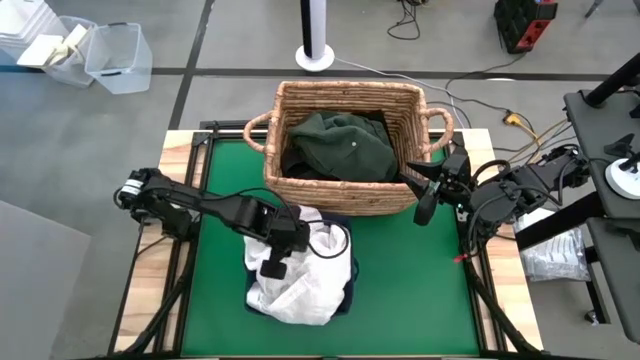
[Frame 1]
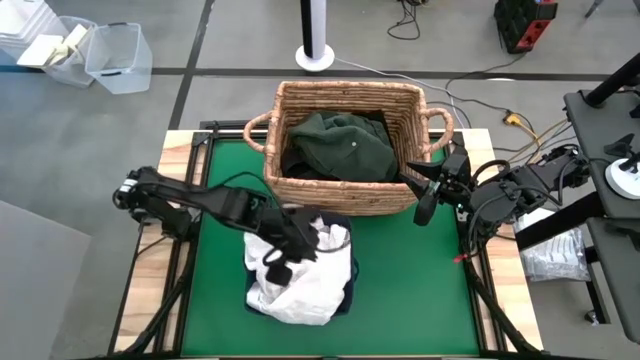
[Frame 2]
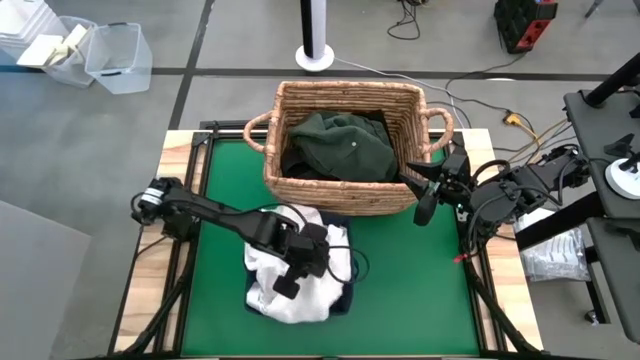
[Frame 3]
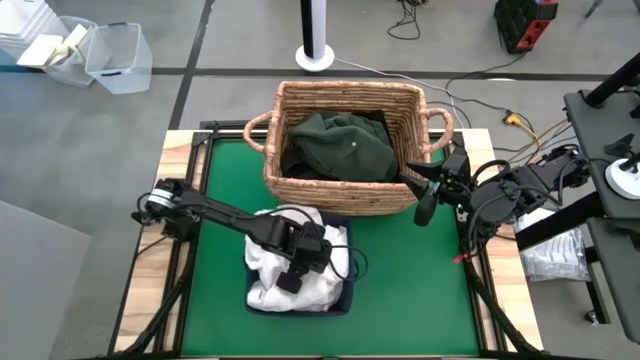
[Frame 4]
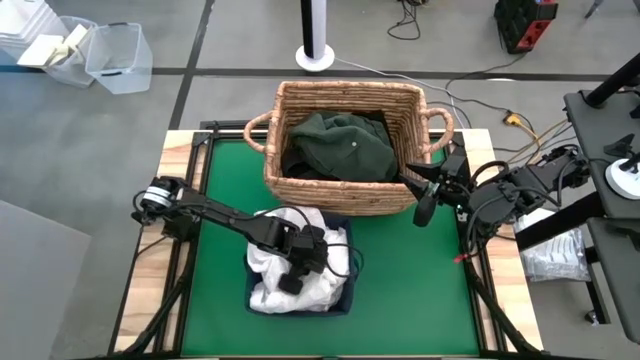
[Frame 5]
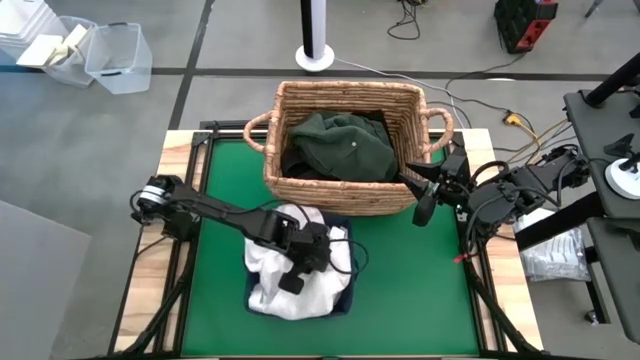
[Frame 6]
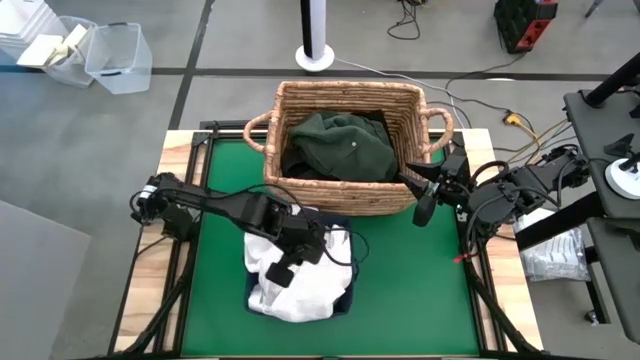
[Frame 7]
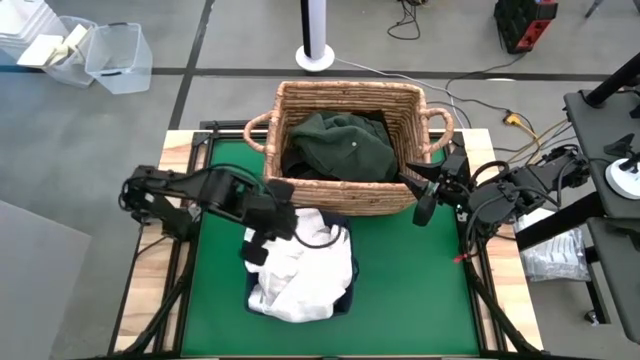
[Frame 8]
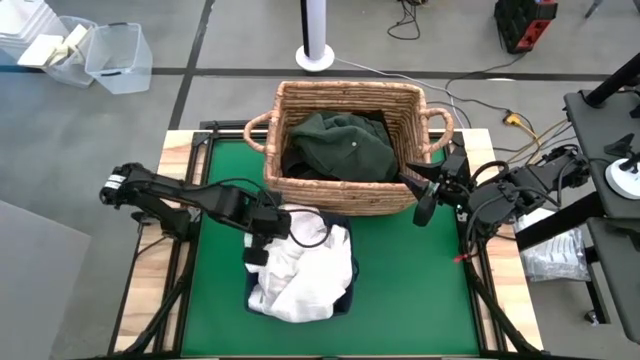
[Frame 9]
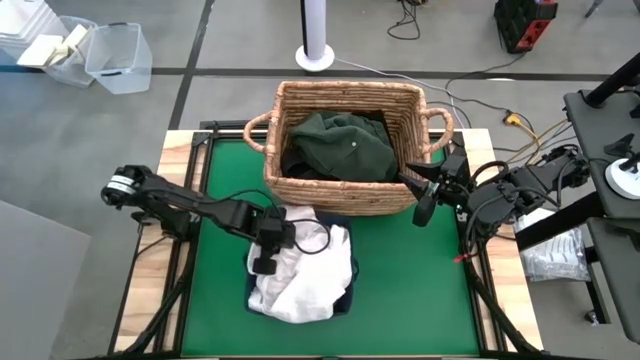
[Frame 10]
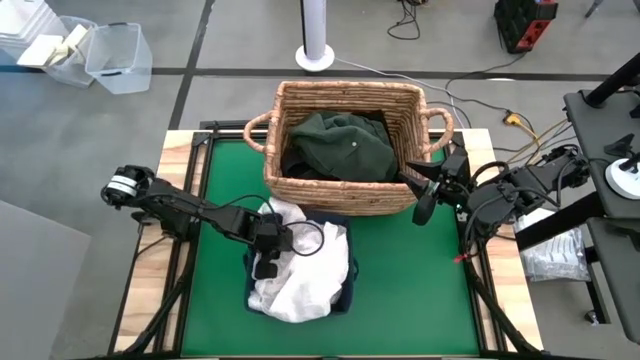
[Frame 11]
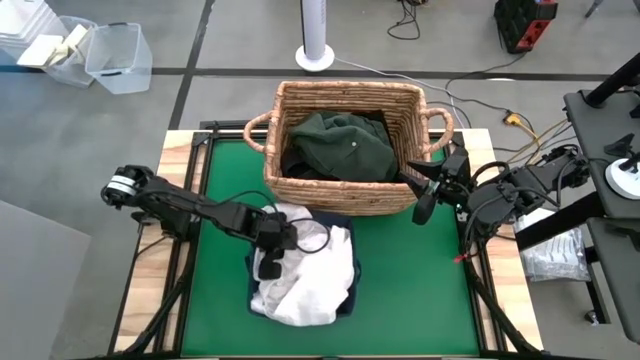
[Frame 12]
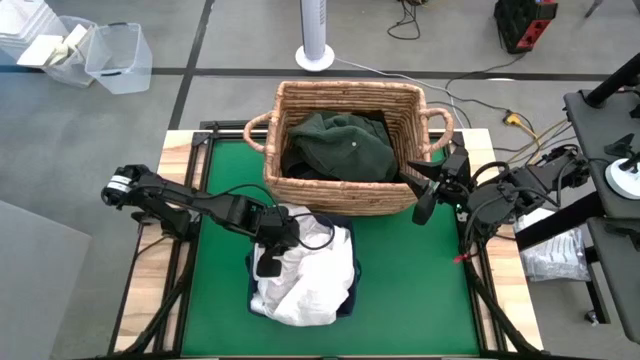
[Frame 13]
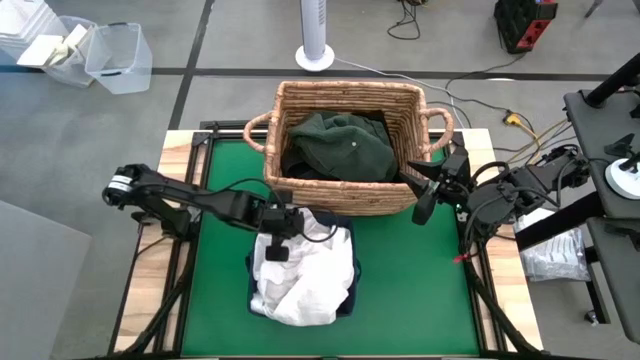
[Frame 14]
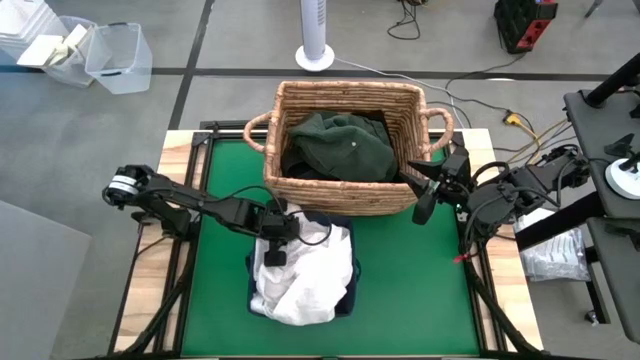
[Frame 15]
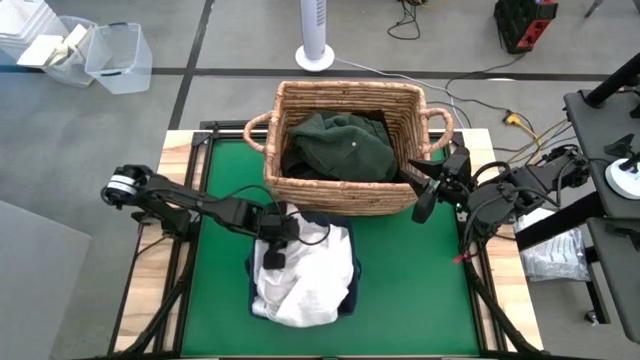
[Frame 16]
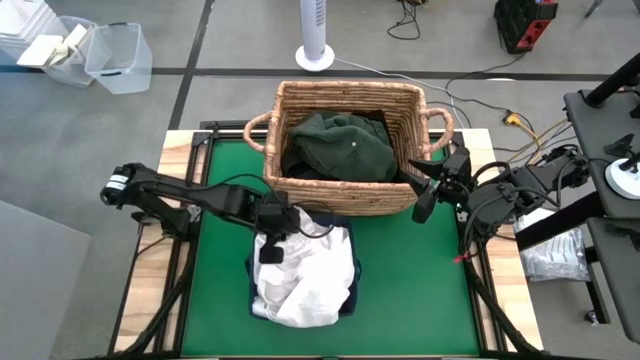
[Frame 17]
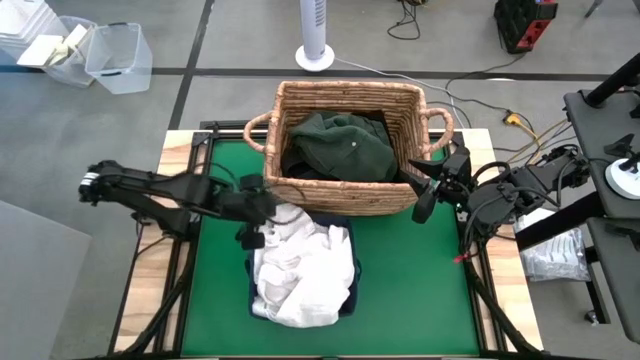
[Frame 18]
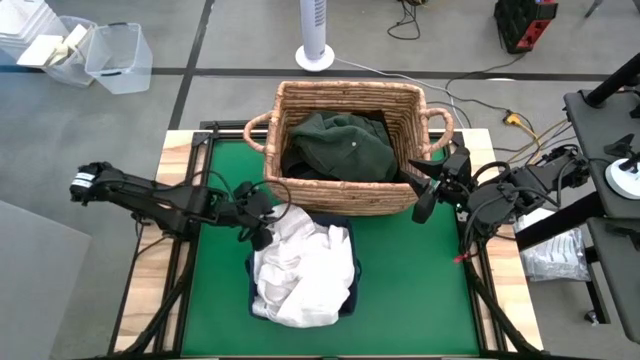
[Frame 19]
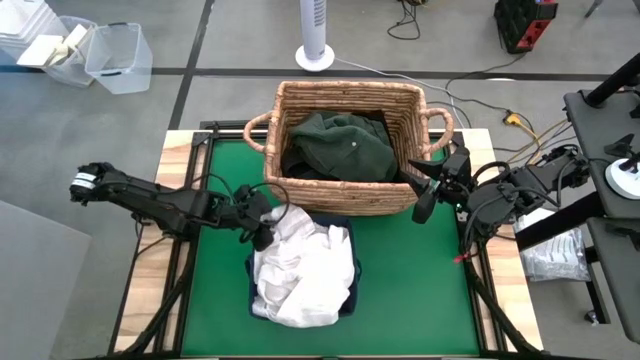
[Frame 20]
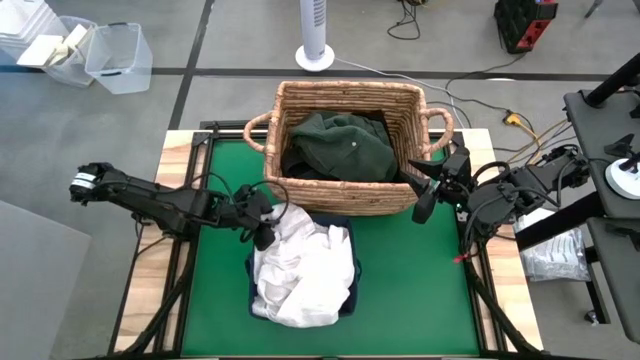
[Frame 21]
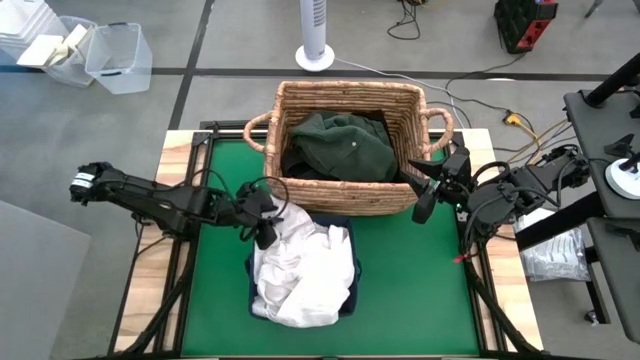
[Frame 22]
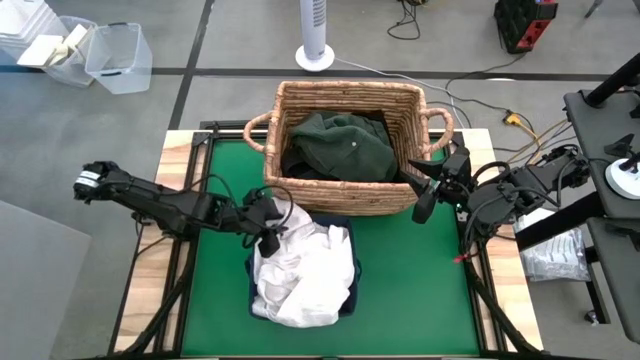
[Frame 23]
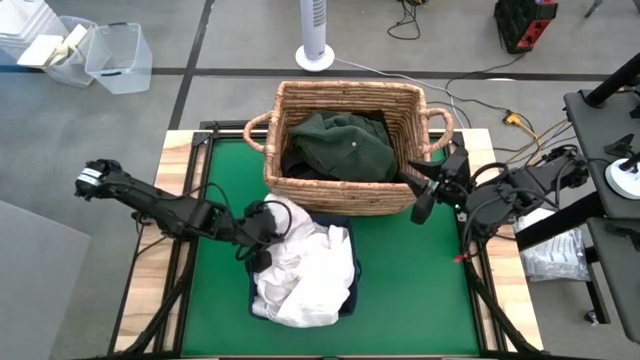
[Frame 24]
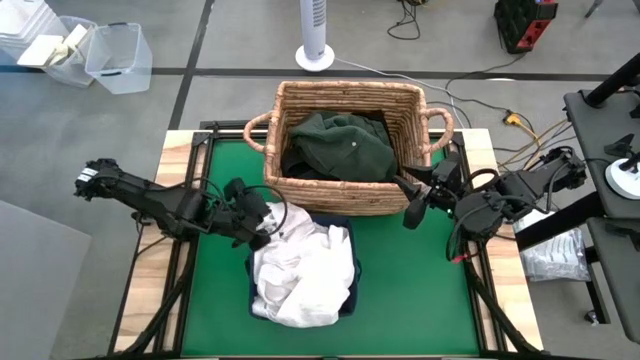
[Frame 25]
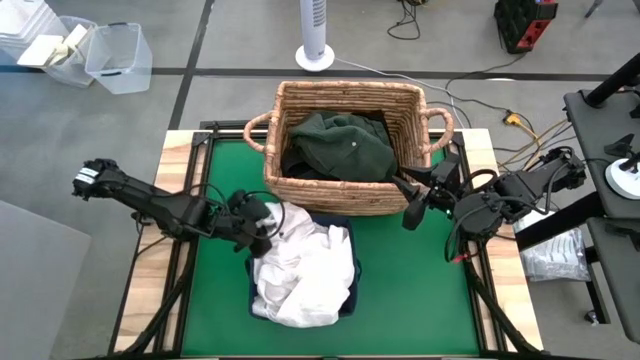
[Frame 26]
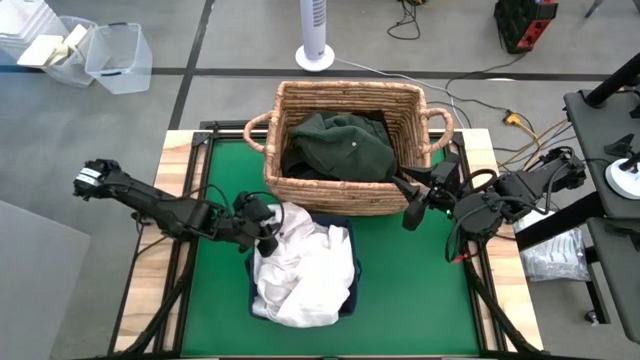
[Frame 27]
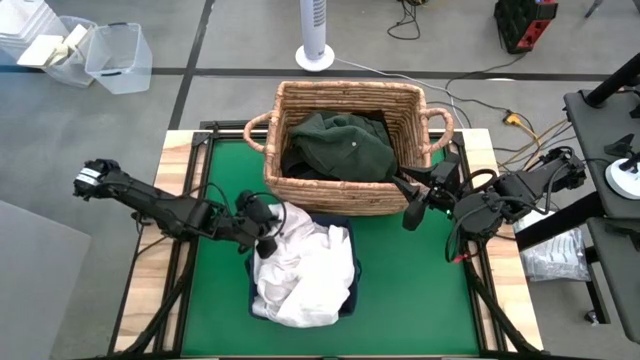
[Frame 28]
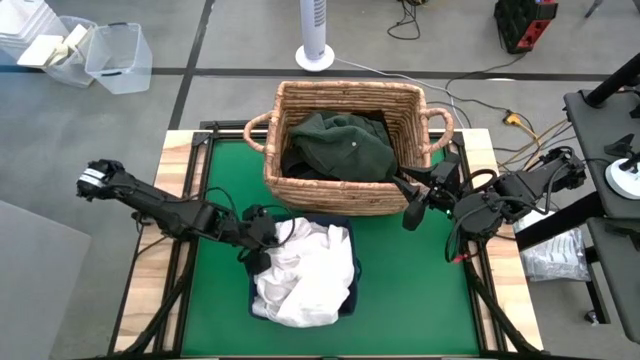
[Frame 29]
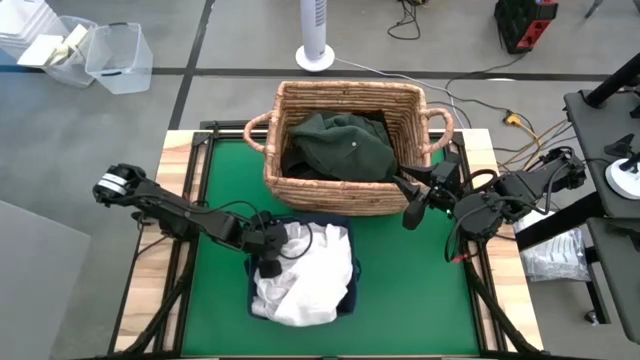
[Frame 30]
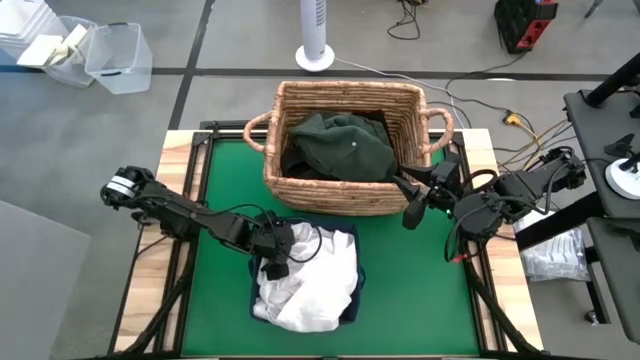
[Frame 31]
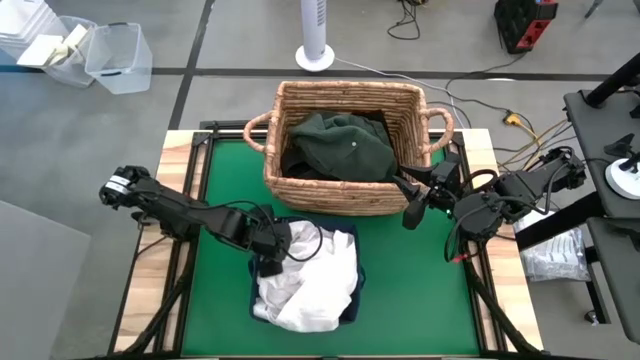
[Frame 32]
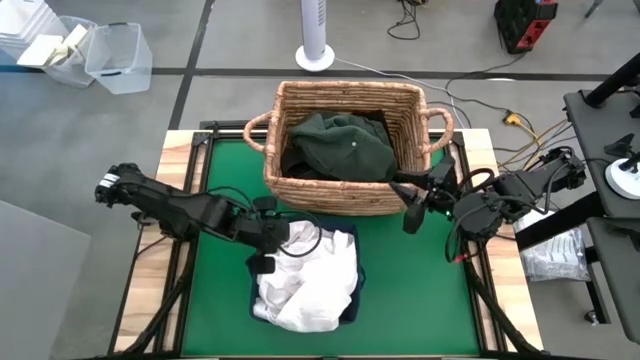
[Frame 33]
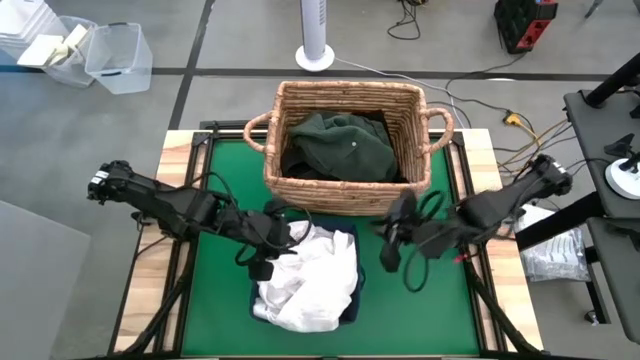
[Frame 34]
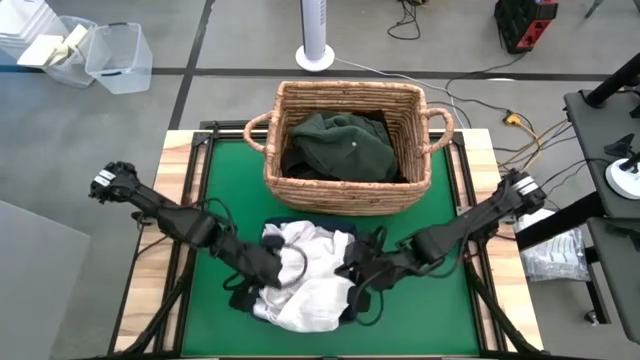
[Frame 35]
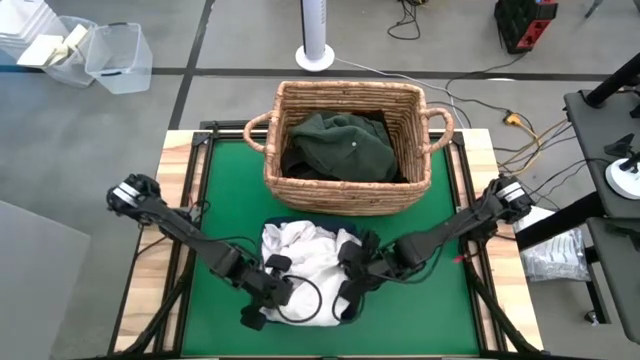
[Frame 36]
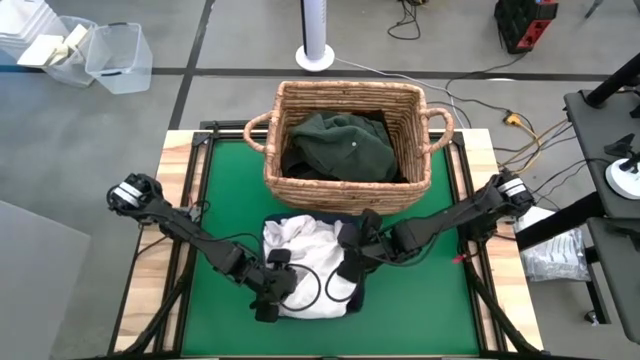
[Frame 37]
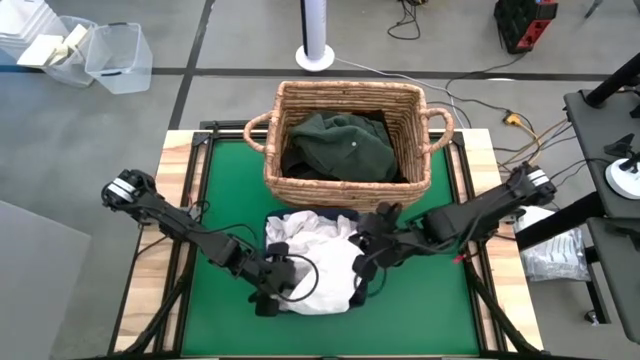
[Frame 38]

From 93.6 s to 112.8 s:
Put the white shirt into the blue laundry organizer
